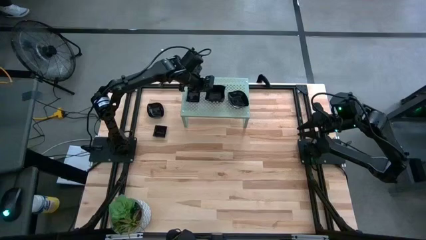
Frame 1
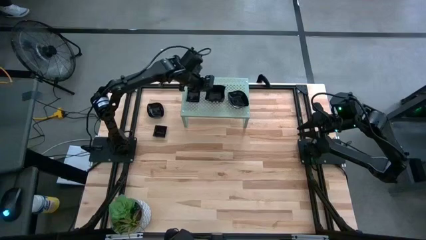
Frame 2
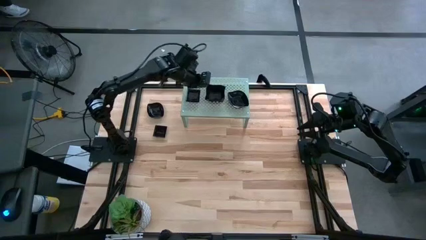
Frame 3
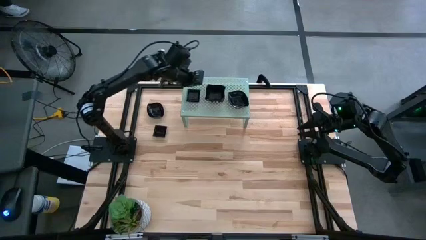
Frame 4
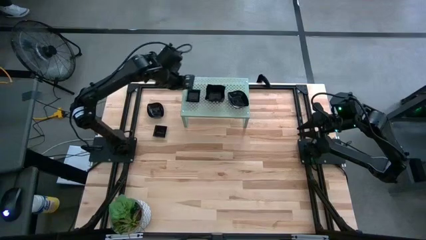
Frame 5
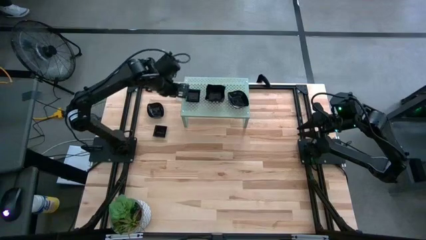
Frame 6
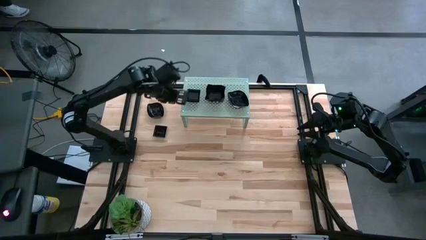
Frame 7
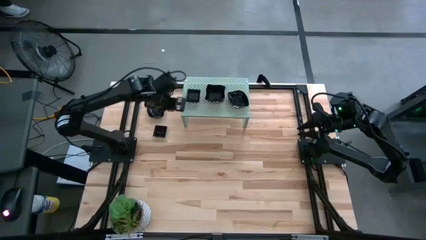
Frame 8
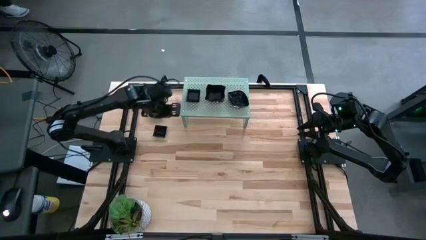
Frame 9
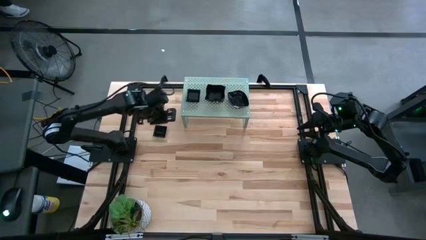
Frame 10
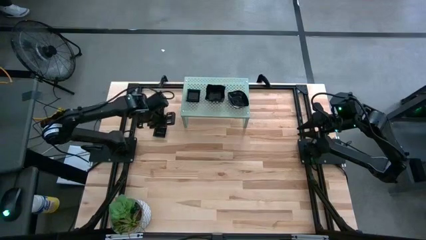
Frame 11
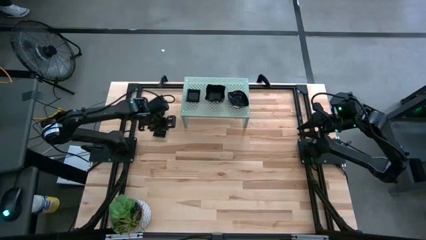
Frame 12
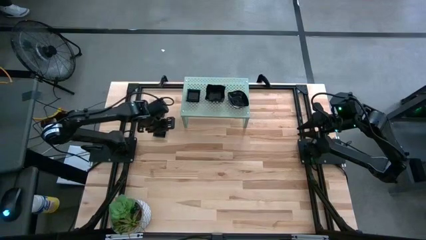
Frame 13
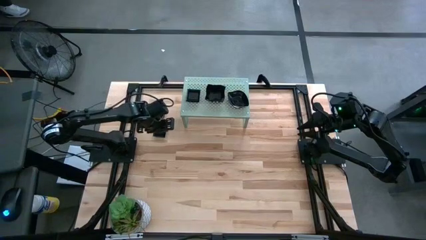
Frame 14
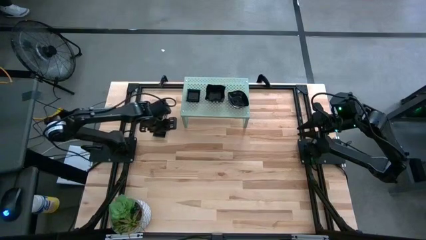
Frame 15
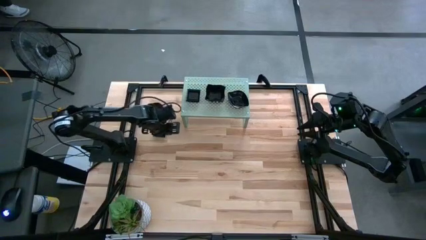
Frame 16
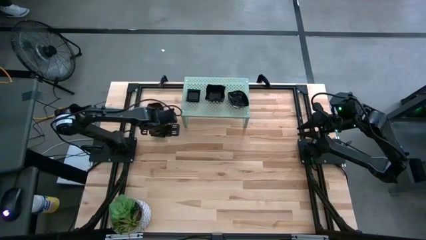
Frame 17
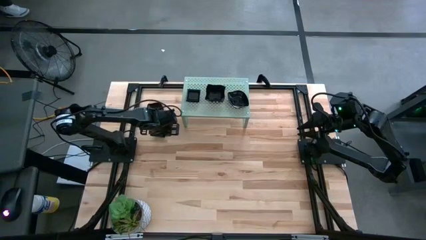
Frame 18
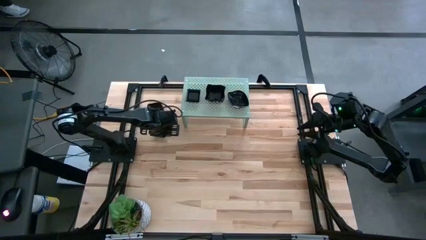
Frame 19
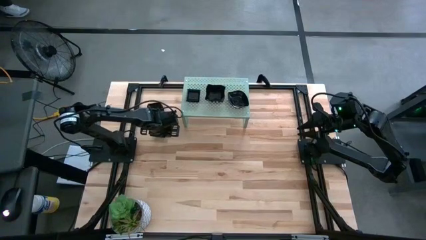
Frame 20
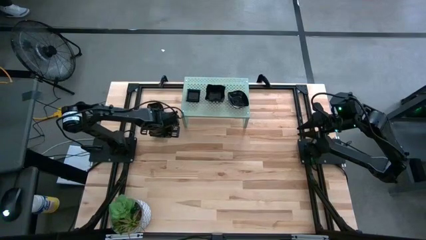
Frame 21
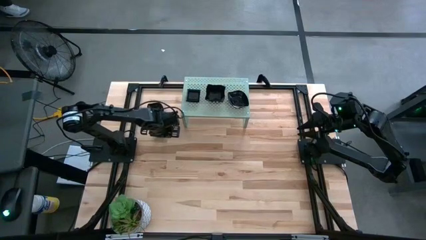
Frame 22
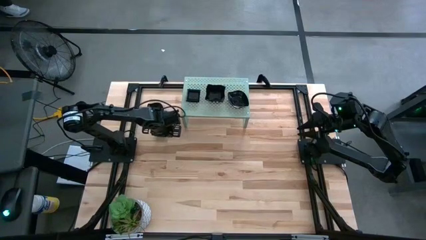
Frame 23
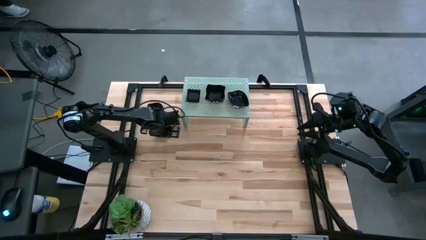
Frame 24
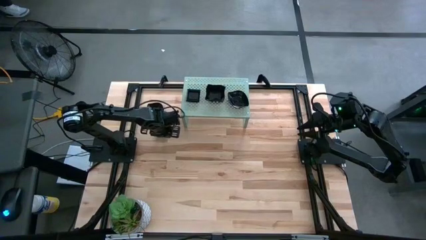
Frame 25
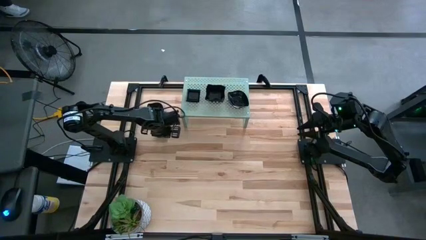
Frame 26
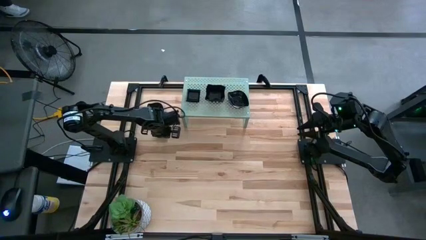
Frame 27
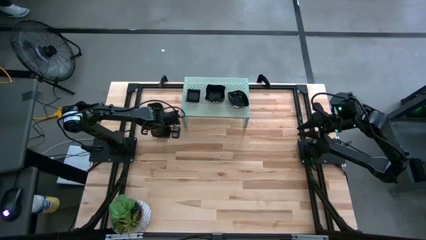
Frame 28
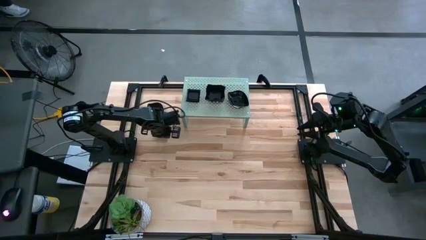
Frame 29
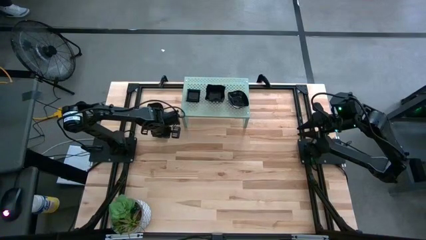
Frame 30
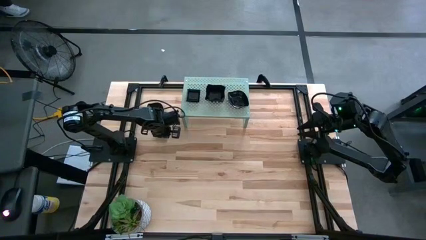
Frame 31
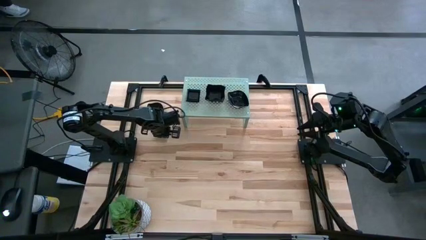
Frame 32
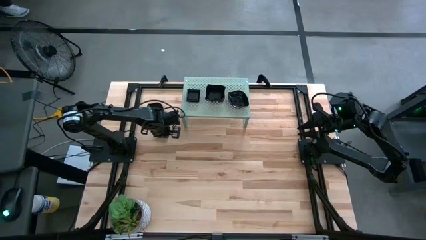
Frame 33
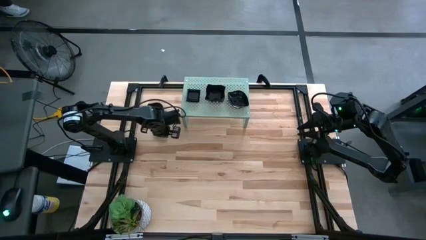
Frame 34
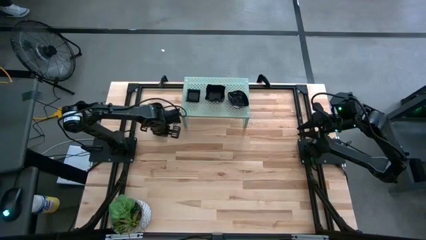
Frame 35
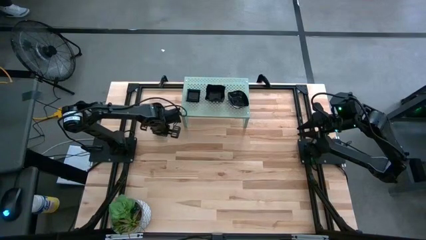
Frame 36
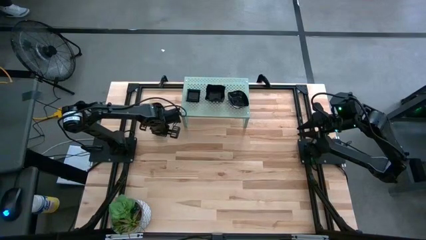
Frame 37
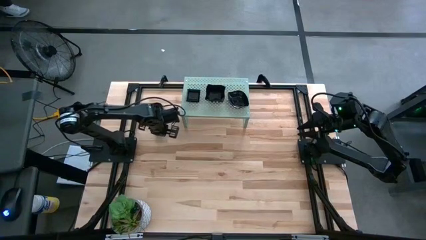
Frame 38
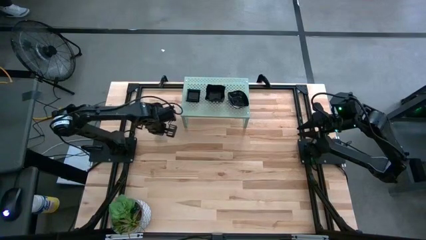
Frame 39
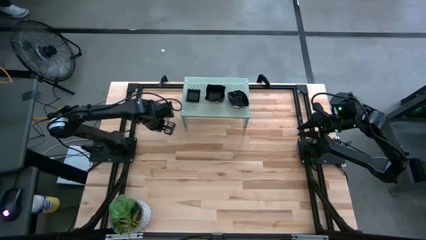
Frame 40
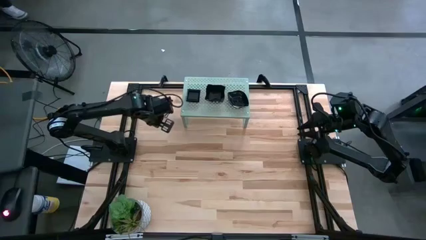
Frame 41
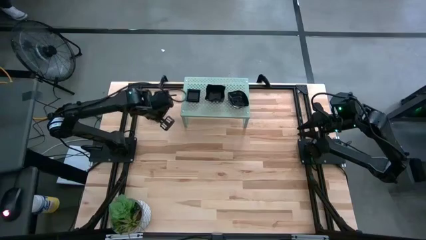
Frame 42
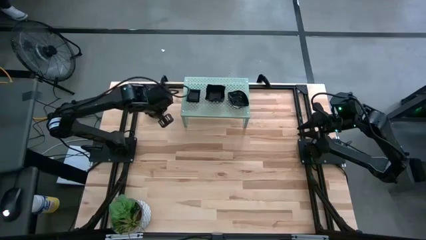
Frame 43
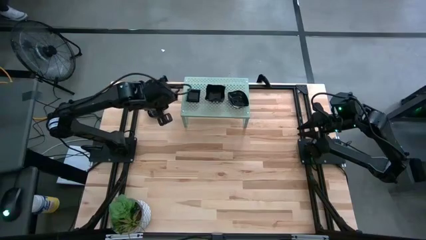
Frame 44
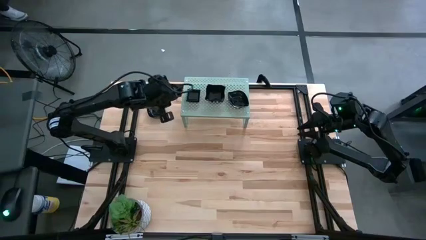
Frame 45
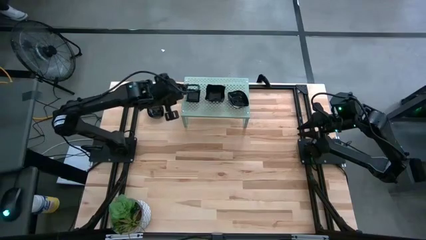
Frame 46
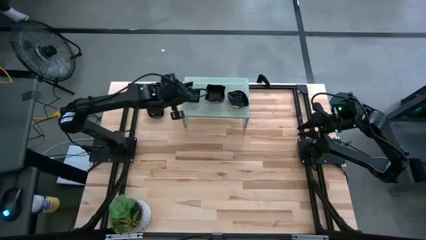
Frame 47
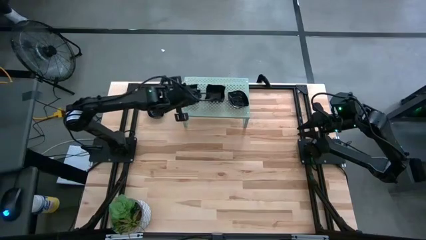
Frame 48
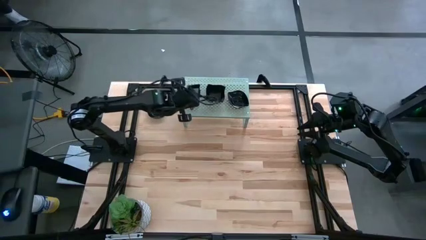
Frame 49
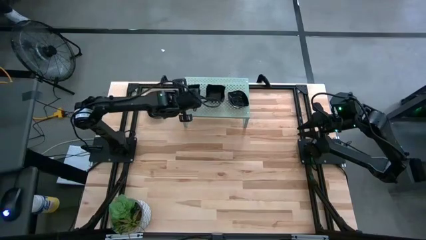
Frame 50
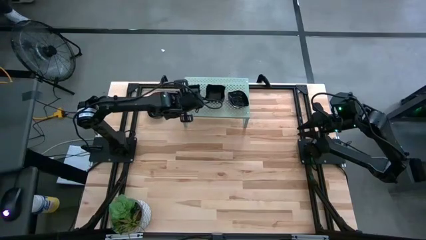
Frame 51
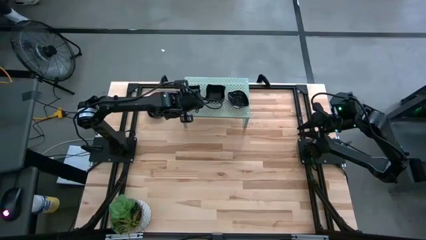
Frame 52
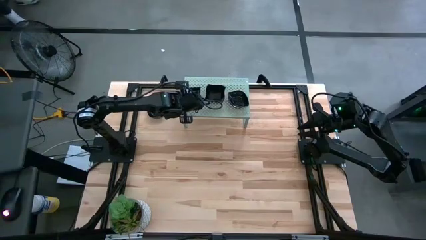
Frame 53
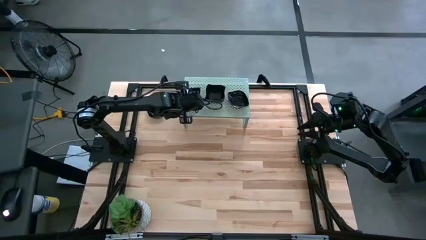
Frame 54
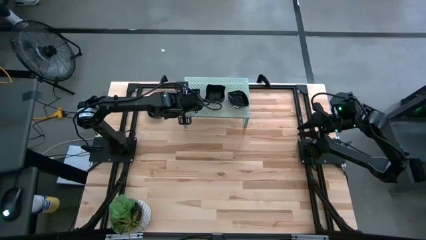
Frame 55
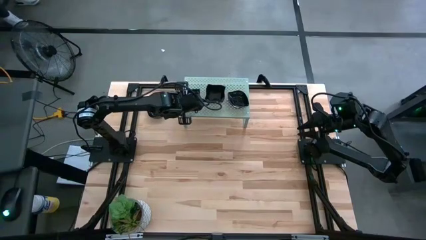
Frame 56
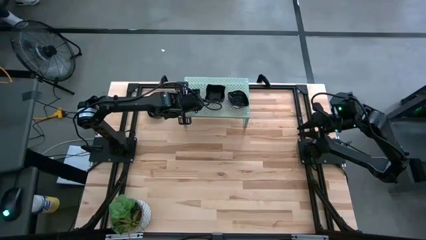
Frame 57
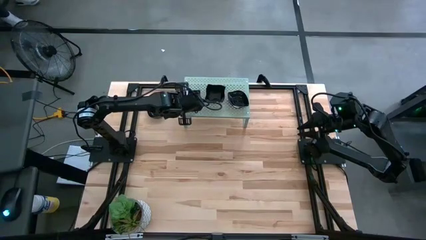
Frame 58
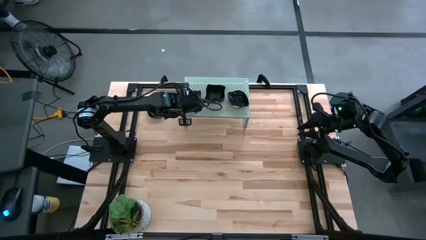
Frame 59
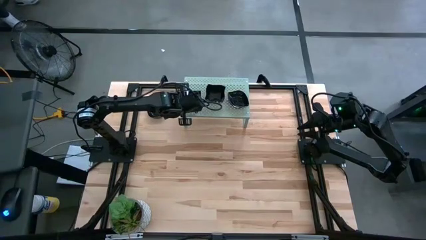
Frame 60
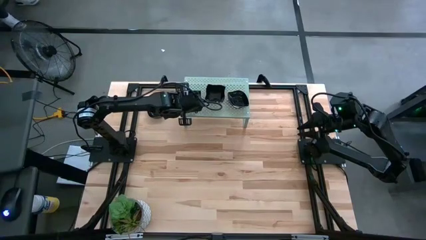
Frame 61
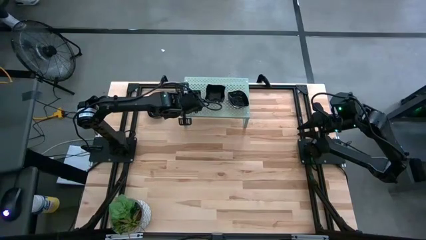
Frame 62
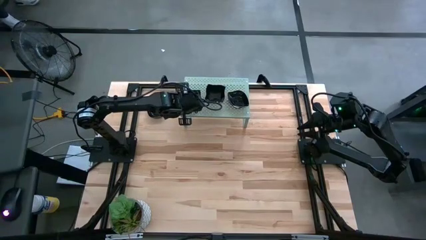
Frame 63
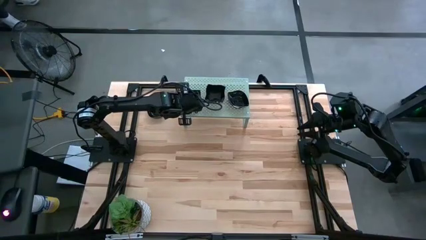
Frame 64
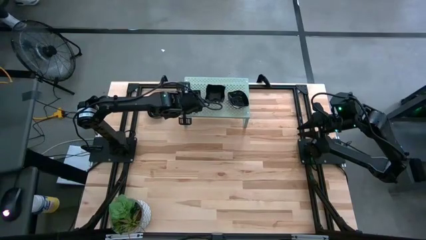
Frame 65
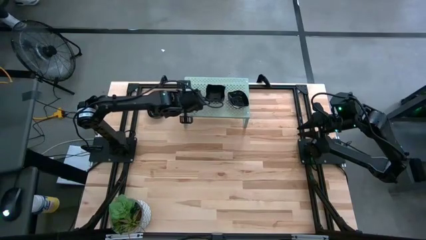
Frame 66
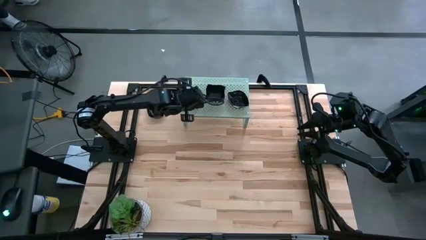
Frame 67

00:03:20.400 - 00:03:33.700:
Task: Pick & Place Mini shaped plates
Stack the square shaped plate on top of the square shaped plate on the shelf
